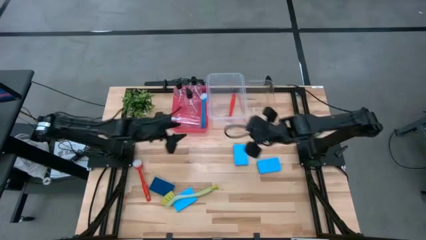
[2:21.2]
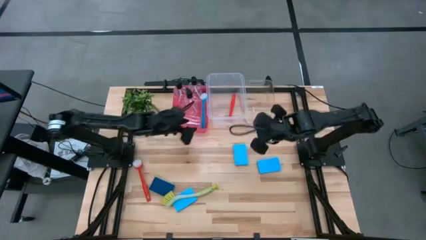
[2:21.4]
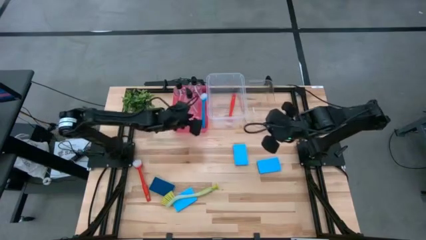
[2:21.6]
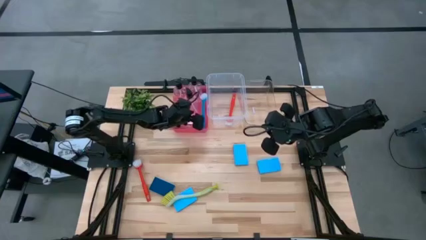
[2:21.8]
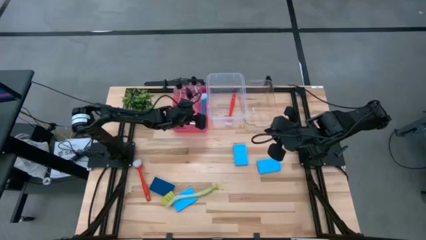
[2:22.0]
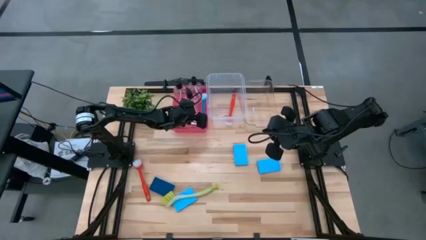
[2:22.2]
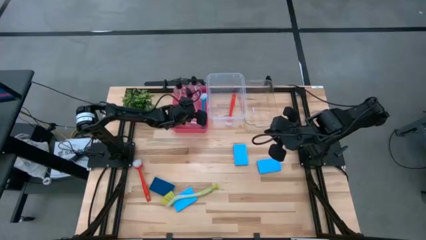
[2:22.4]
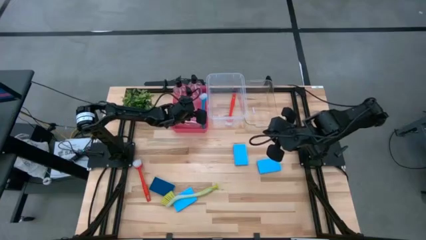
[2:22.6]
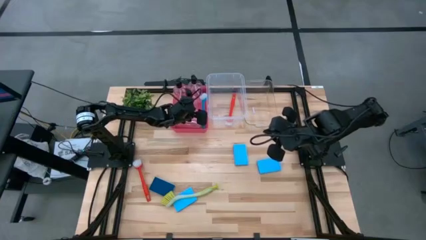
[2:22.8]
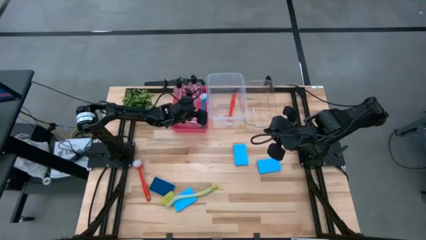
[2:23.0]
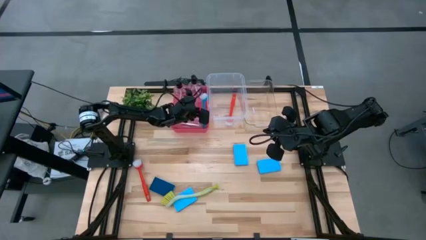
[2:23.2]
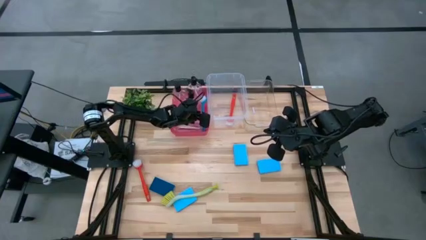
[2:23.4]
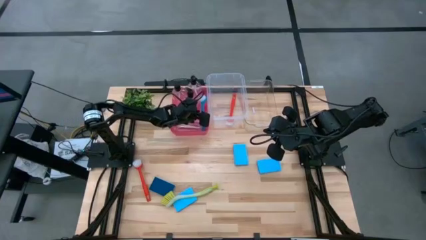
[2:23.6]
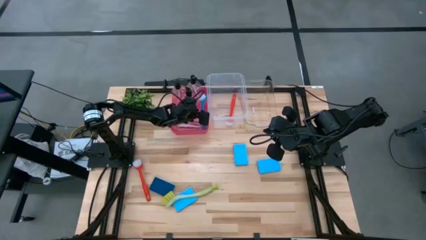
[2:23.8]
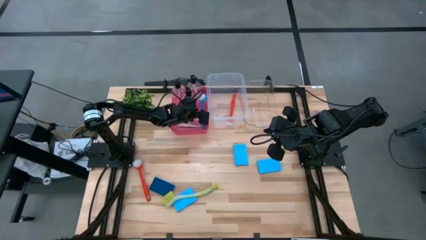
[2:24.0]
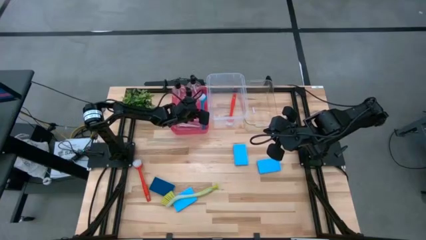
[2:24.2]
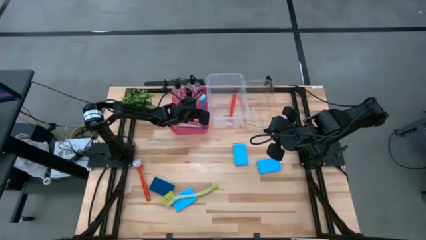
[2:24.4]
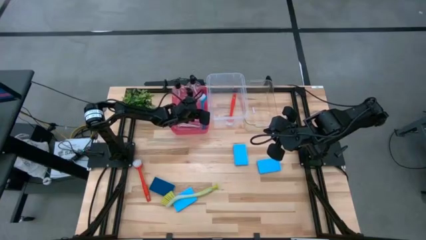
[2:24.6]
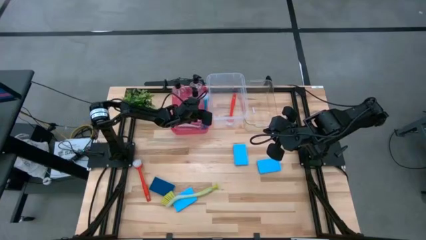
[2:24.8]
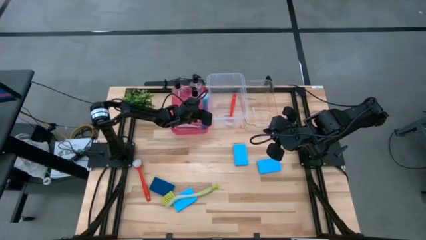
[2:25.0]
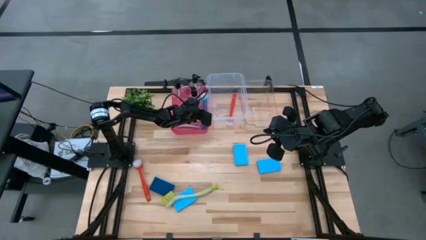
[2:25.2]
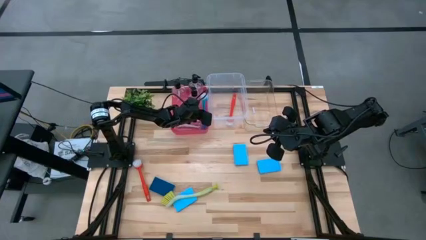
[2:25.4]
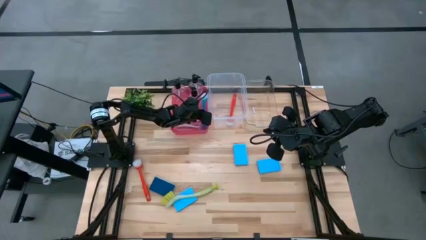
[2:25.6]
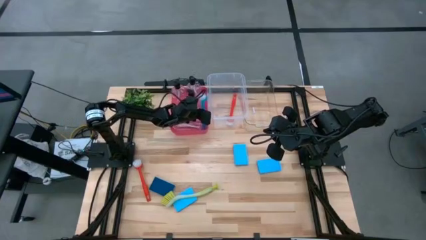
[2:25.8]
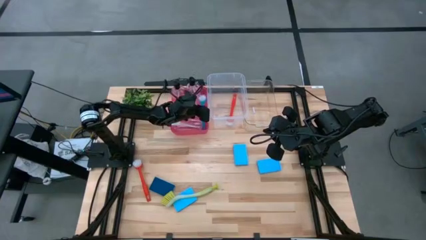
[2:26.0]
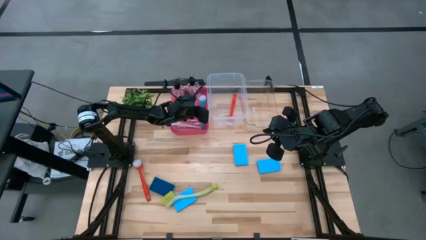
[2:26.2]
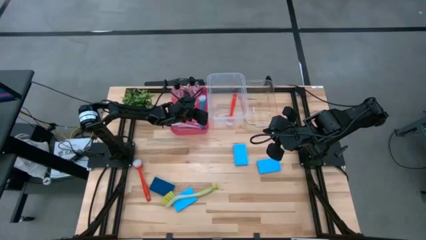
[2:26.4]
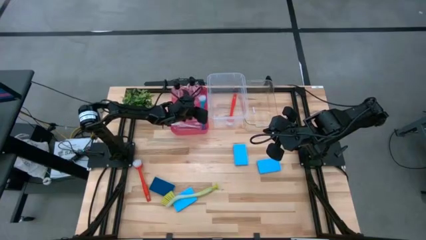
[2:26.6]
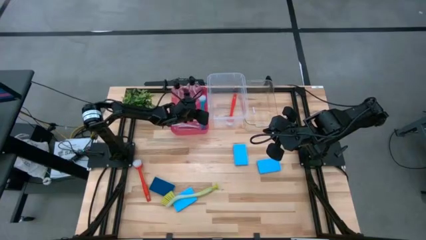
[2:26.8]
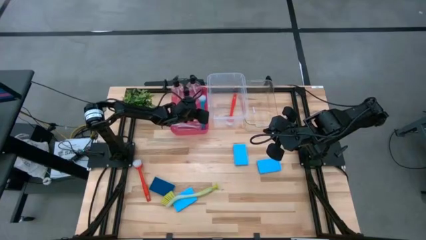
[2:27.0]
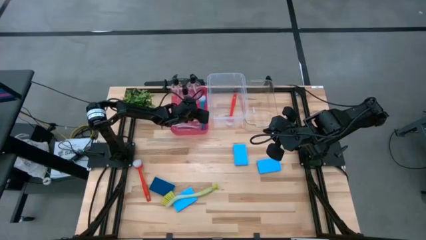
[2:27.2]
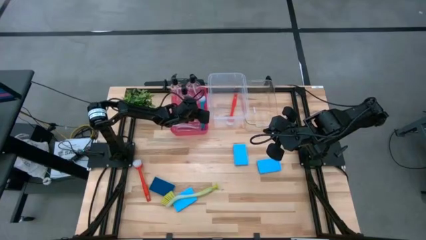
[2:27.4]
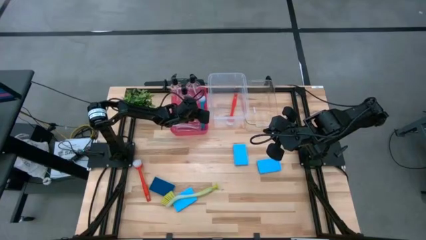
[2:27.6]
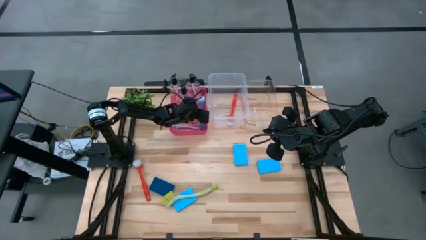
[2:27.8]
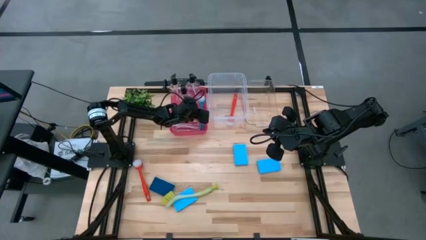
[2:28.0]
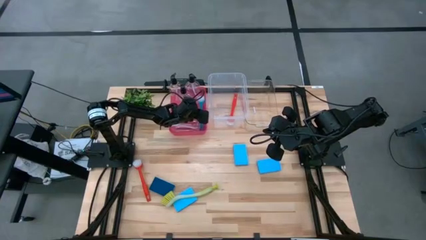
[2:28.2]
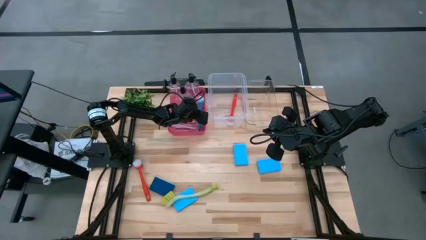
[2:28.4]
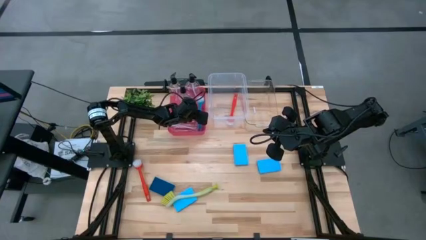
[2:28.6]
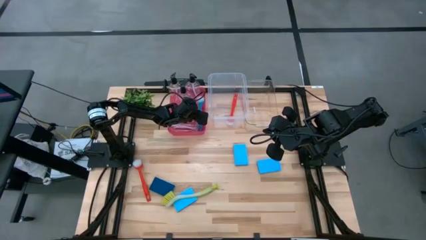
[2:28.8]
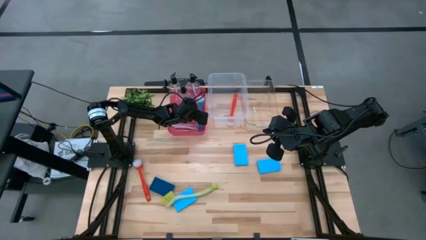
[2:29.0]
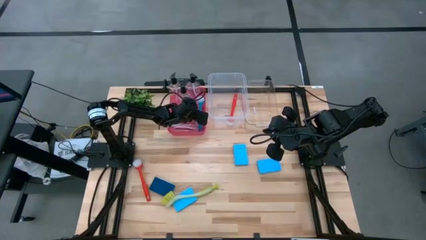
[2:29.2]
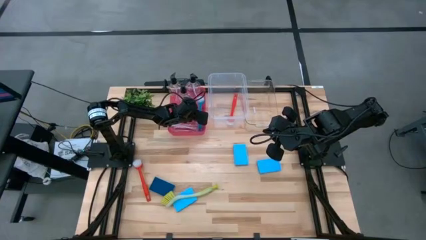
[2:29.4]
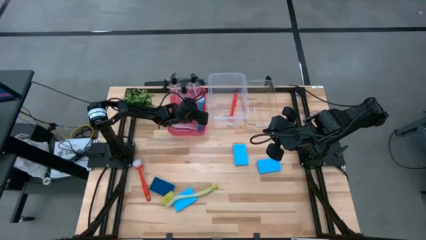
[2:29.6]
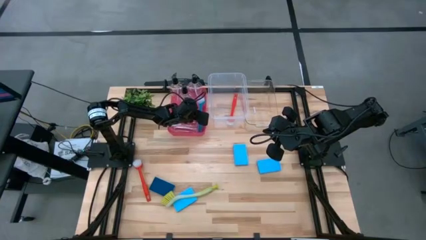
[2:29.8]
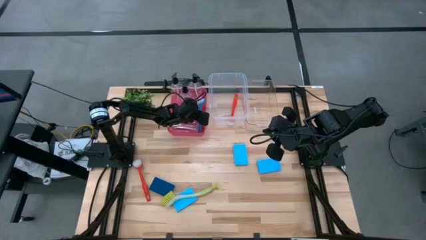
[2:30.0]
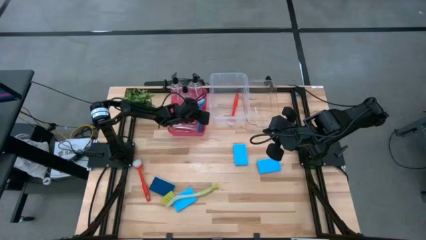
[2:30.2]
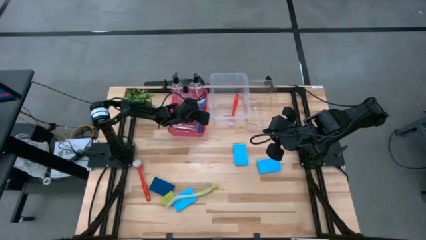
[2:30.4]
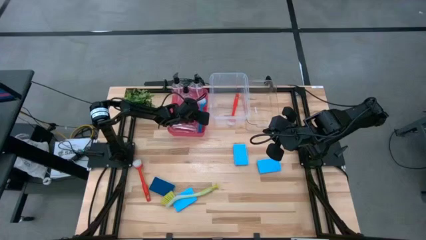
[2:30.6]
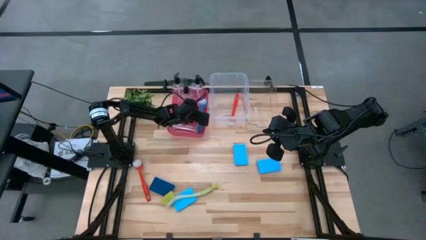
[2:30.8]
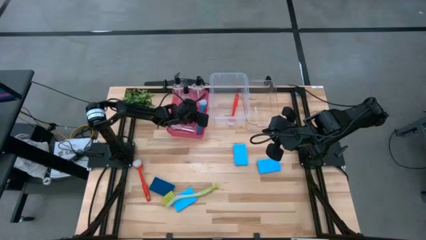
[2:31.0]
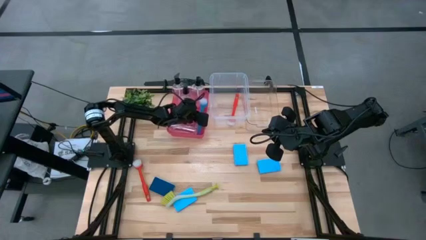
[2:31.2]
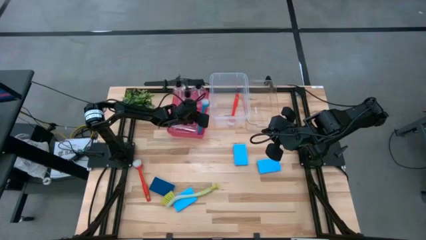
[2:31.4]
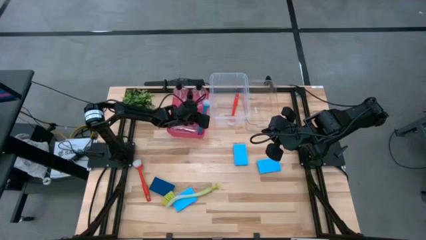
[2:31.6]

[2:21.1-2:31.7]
Task: Pick & Place Kitchen Sink Supplies
Put the blue dishwashing brush into the red bin

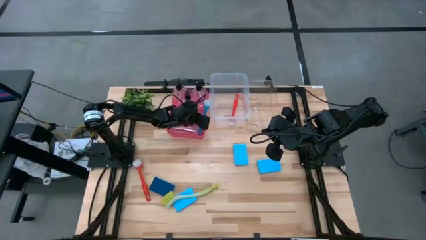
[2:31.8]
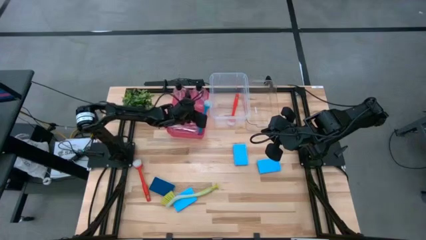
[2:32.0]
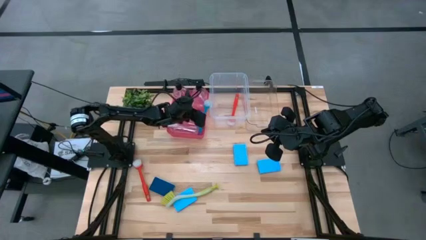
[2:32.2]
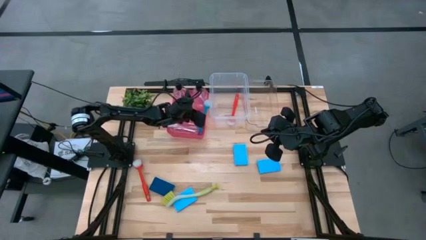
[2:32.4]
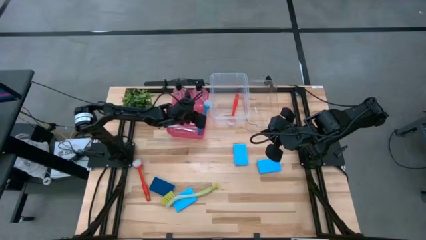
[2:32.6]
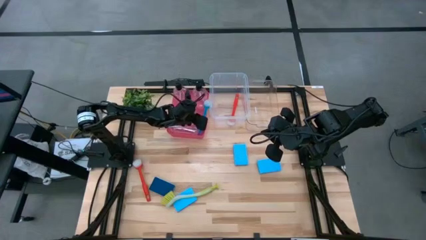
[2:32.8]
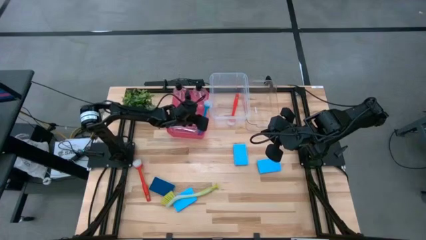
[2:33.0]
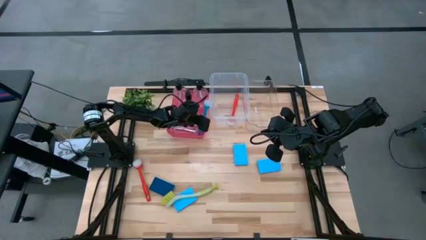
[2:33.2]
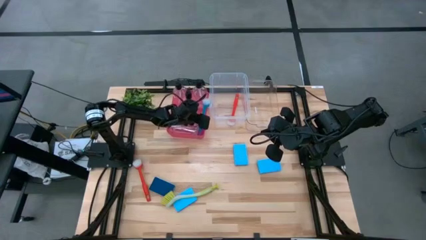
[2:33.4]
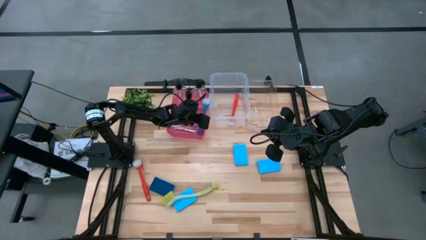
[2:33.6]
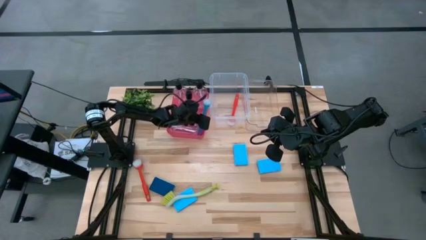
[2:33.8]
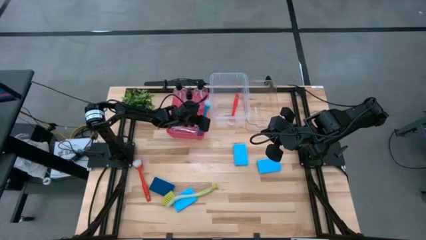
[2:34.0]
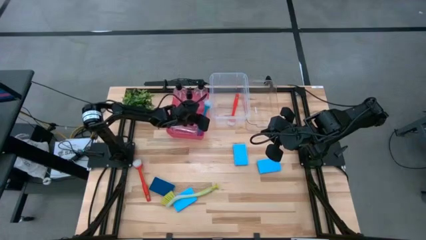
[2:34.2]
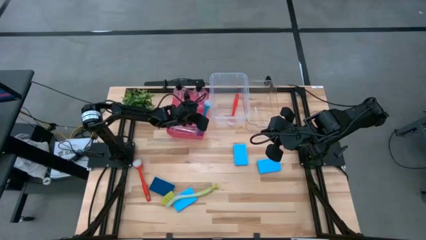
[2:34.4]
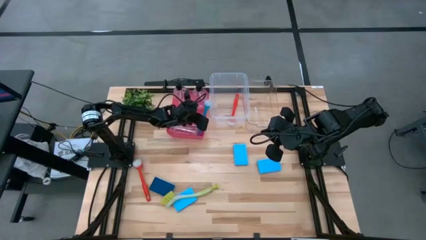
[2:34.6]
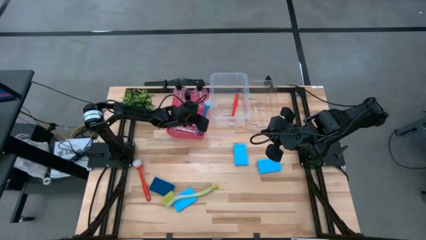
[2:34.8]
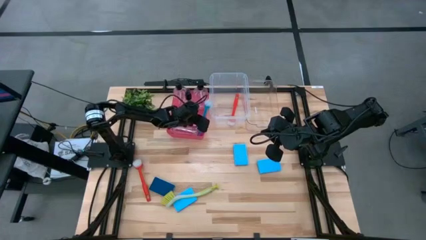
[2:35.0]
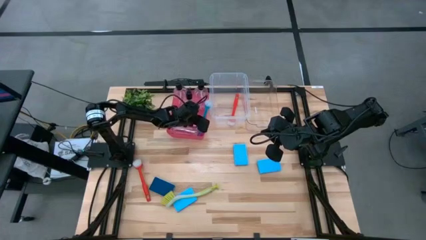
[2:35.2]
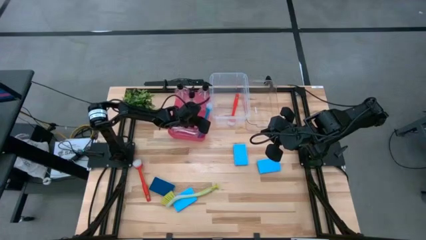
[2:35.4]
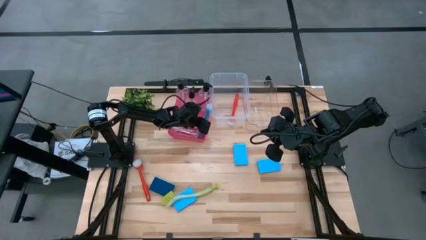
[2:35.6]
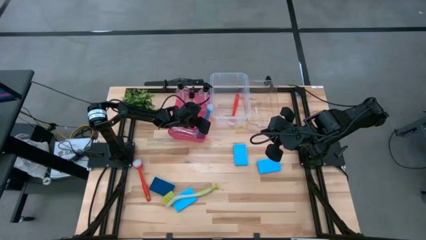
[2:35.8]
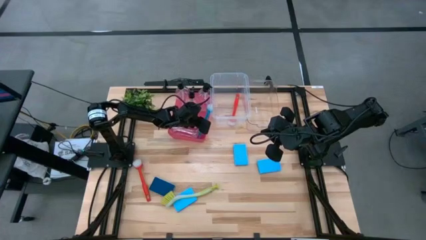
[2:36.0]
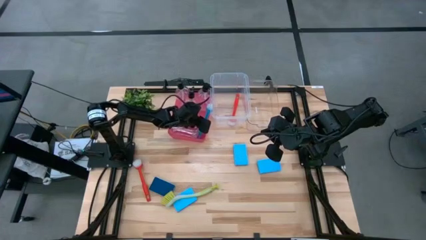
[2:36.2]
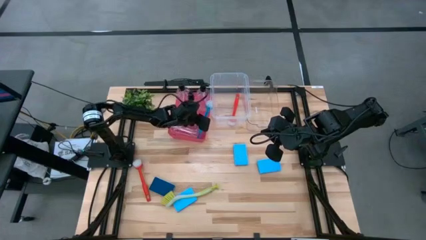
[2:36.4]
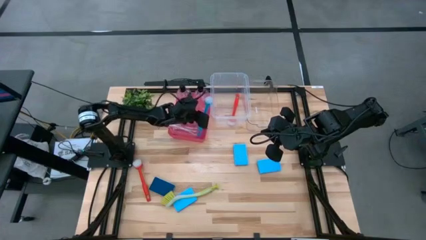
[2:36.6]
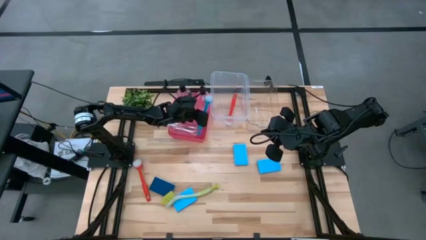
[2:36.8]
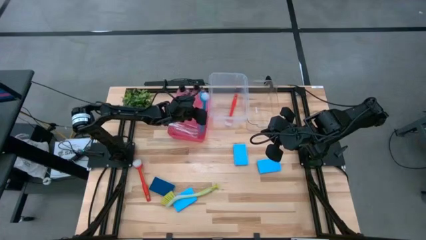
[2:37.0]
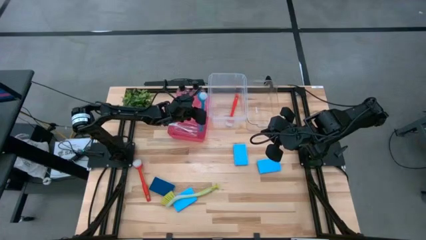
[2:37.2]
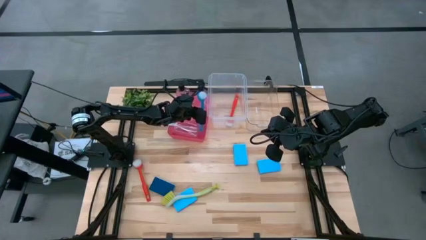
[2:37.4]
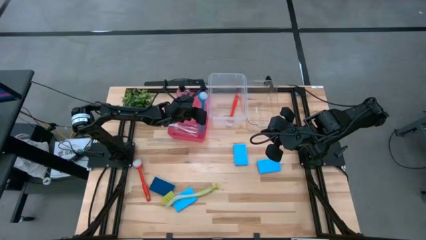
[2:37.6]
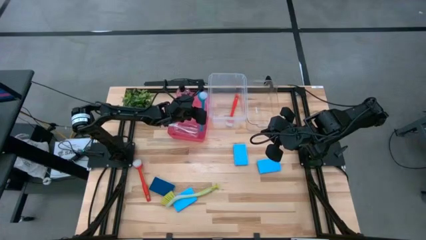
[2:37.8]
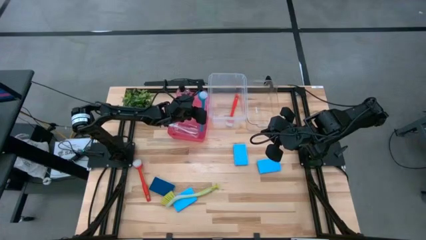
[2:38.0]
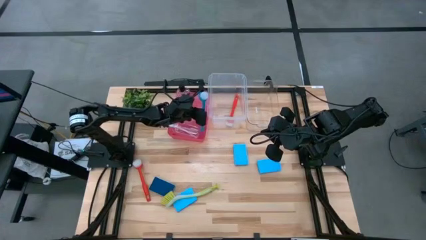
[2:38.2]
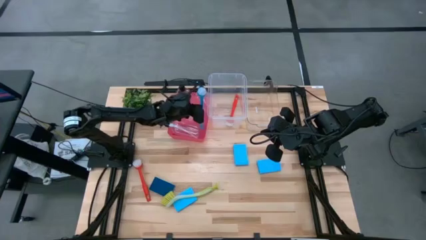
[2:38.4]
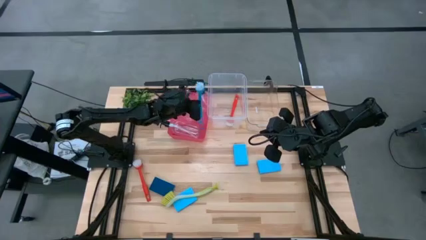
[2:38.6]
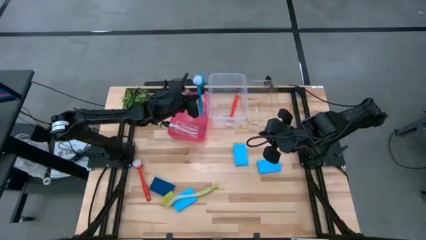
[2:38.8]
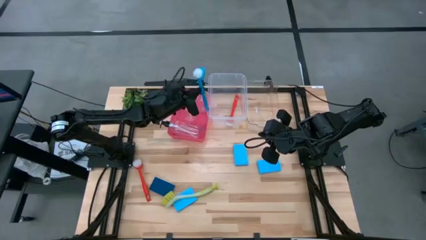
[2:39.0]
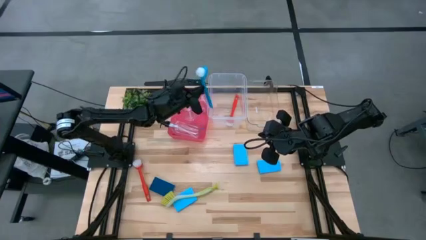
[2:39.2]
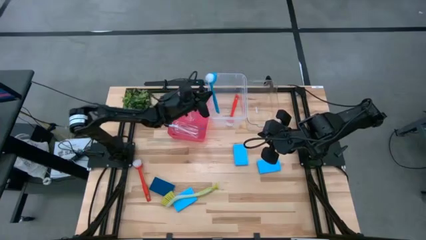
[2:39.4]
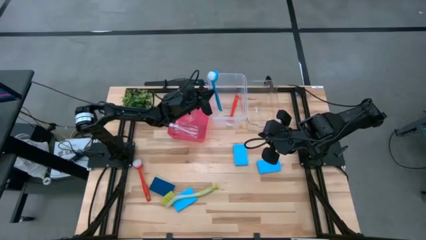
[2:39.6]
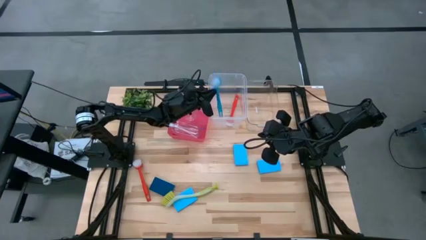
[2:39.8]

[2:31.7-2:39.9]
Put the blue dishwashing brush into the red bin
